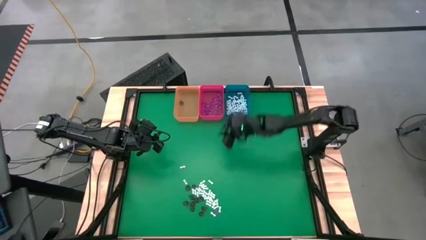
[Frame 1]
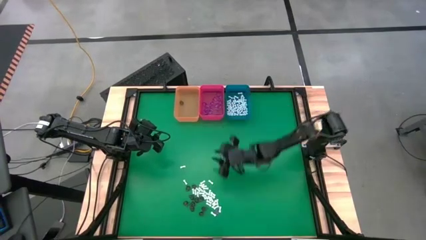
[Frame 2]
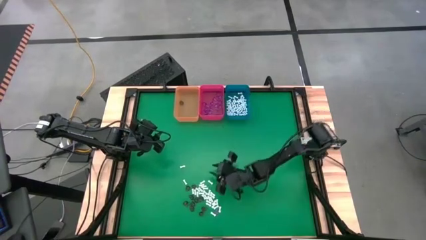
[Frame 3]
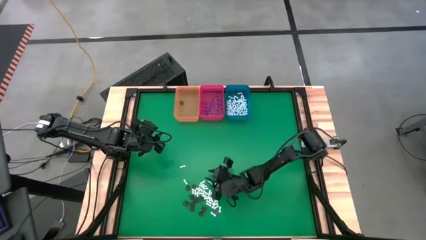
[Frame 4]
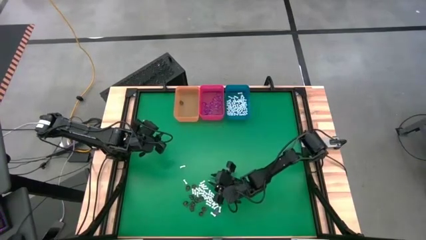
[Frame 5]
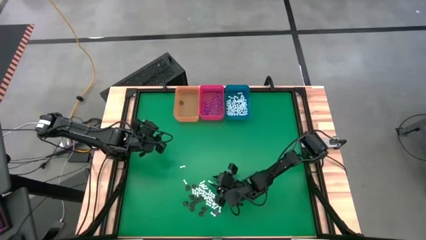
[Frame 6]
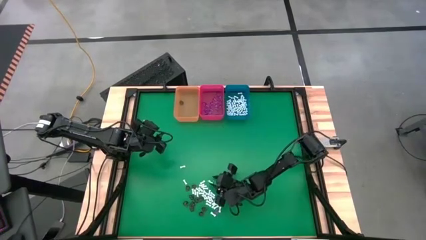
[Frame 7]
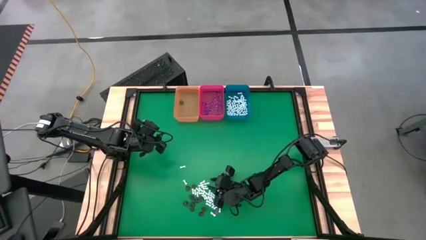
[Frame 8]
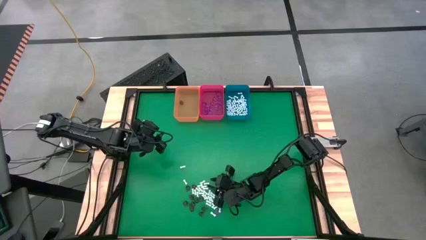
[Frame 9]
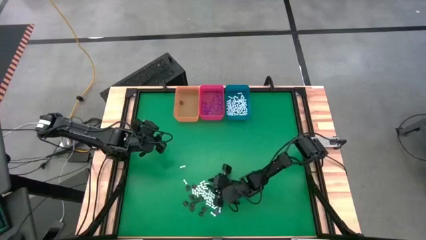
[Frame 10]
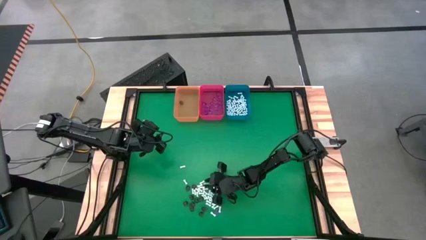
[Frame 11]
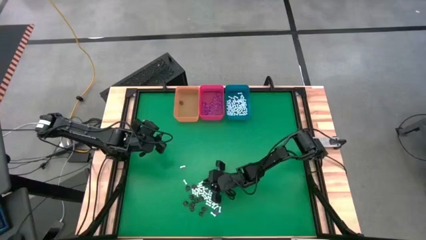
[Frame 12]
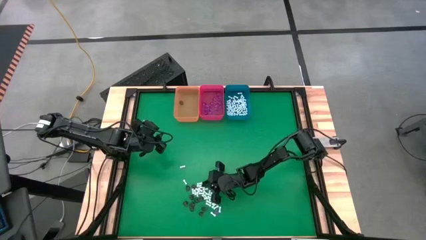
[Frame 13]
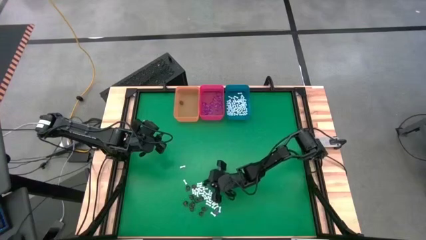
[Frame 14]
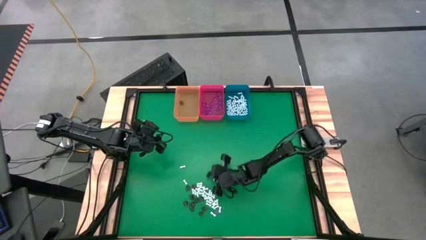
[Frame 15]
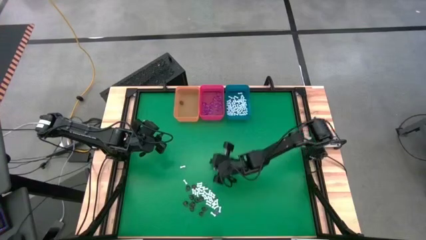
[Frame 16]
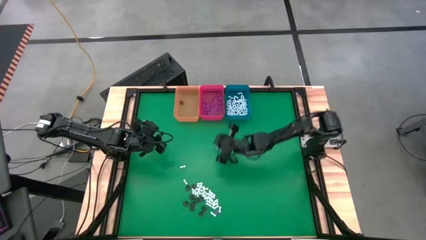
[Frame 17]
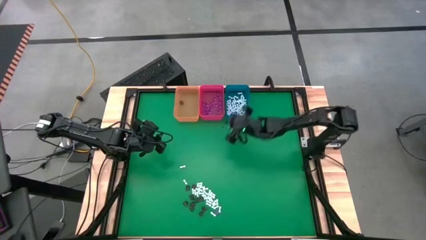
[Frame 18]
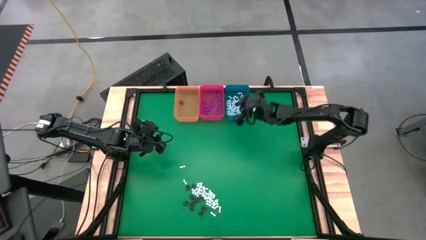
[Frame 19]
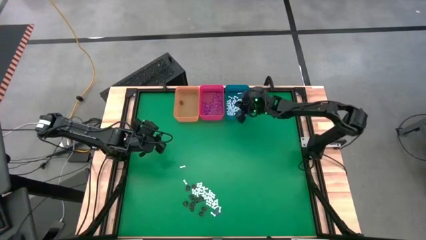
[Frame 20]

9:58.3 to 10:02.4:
Task: Sort Halloween decoration
Put the white bone toy into the blue bin

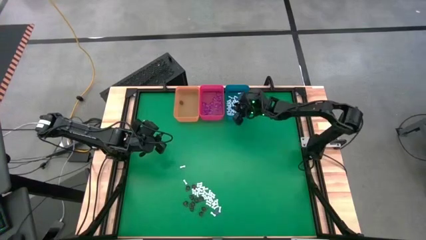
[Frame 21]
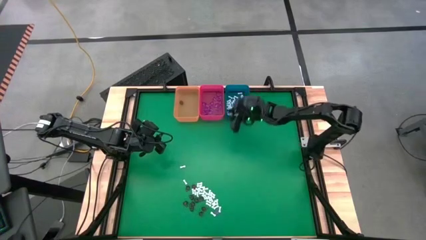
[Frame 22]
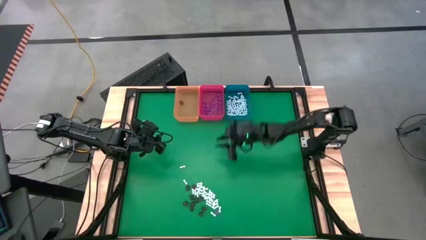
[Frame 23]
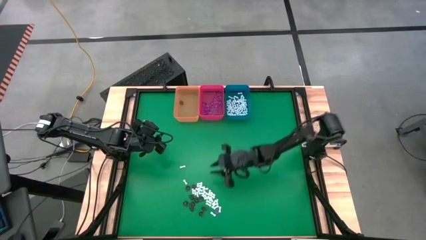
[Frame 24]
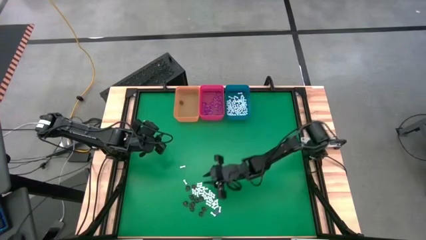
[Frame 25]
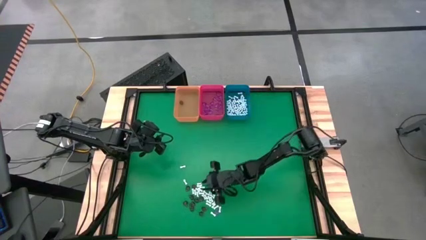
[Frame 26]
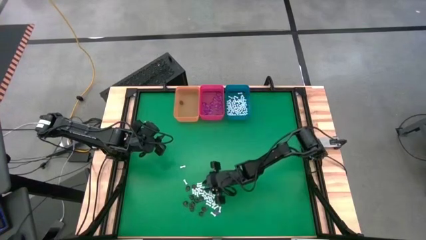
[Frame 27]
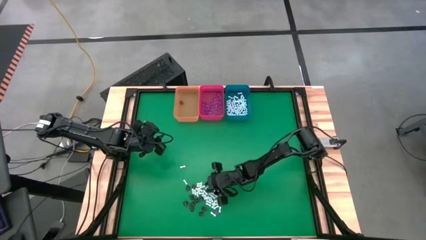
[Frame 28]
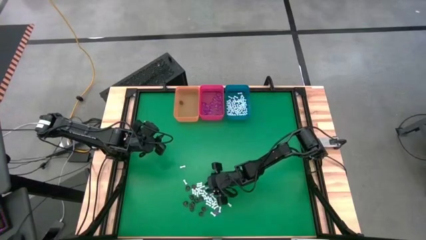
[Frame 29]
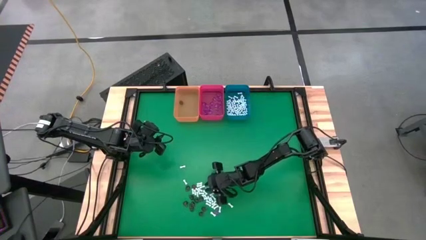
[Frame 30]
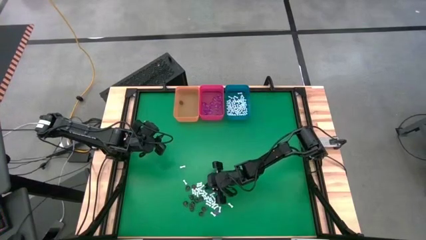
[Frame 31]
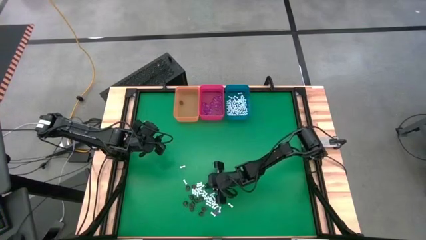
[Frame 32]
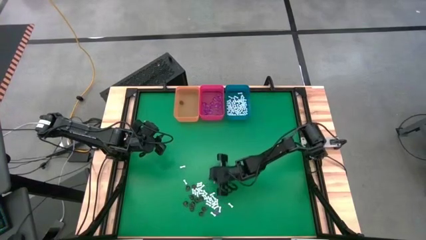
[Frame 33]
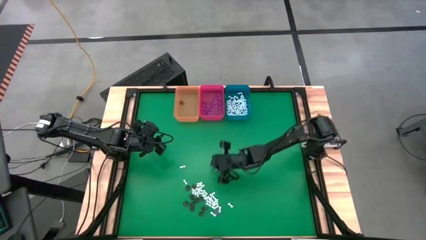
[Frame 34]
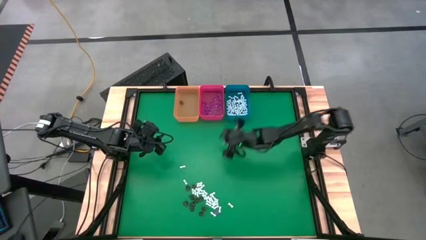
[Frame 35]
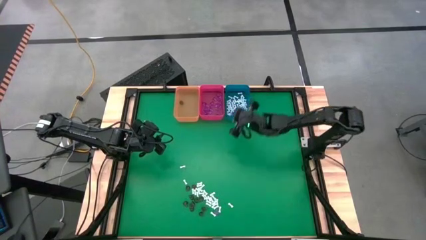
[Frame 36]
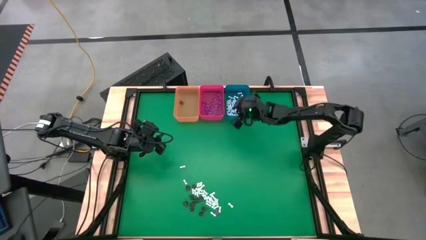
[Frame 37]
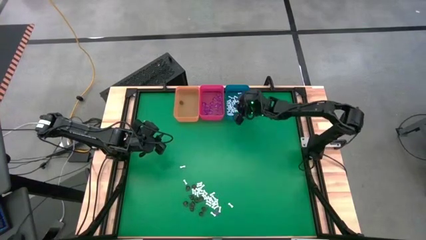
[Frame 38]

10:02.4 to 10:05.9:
Put the white bone toy into the blue bin

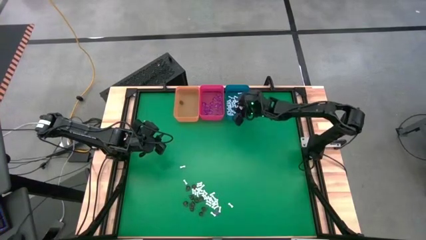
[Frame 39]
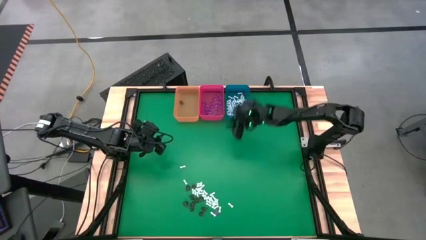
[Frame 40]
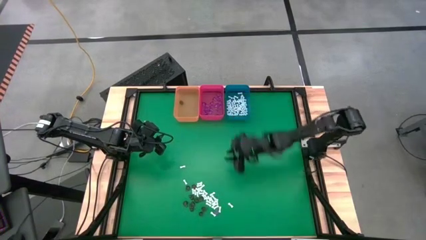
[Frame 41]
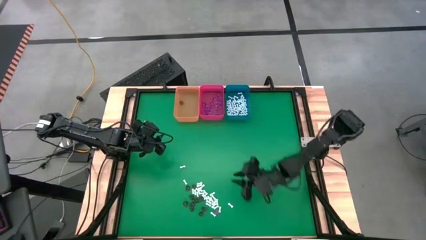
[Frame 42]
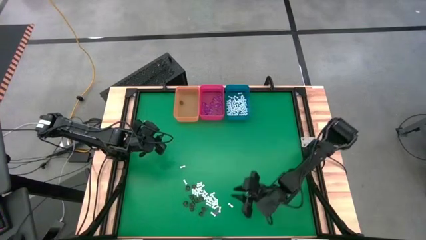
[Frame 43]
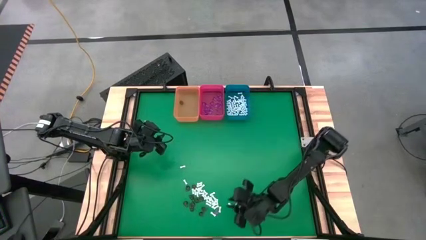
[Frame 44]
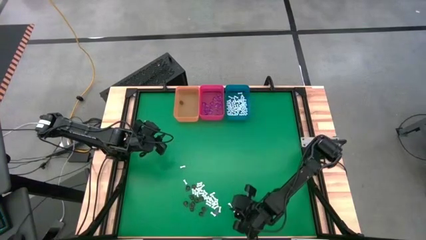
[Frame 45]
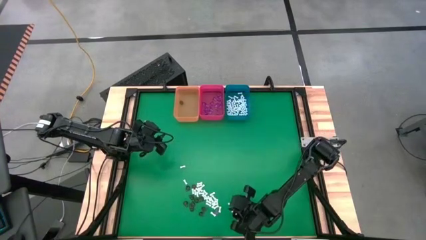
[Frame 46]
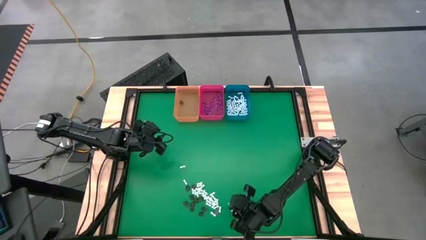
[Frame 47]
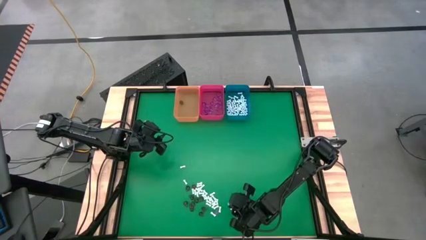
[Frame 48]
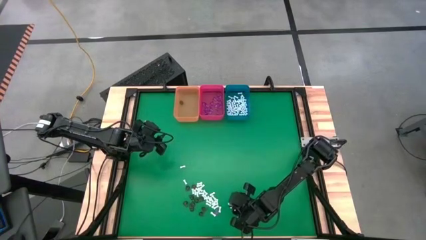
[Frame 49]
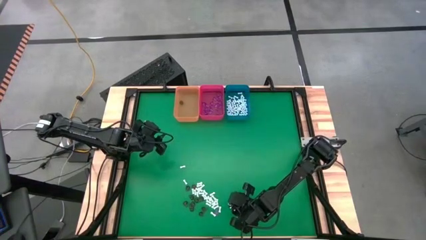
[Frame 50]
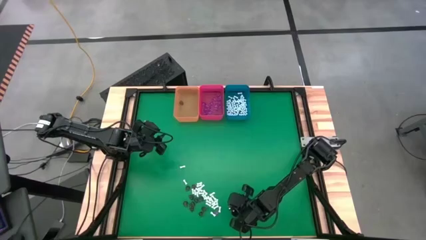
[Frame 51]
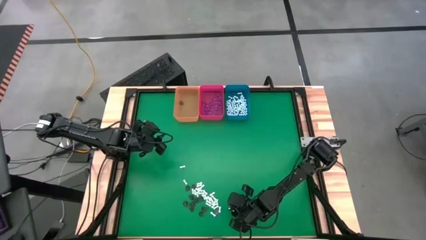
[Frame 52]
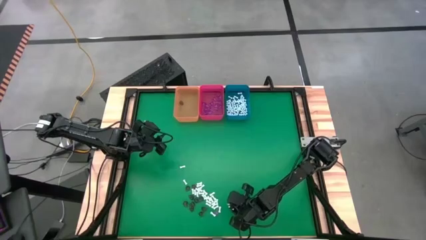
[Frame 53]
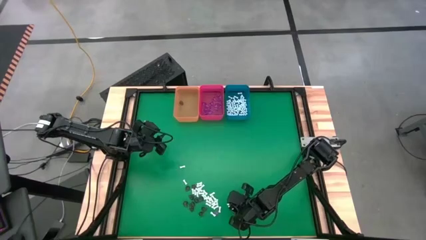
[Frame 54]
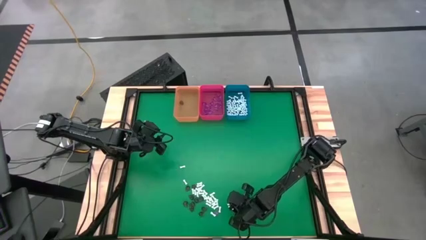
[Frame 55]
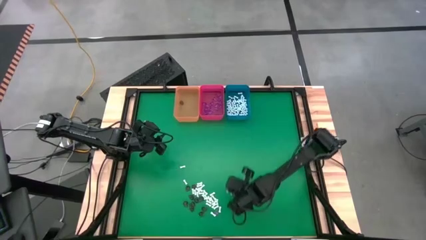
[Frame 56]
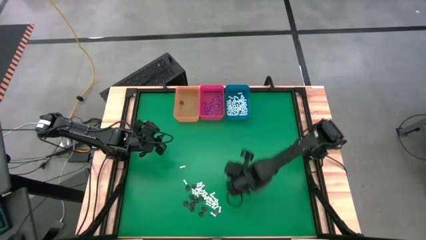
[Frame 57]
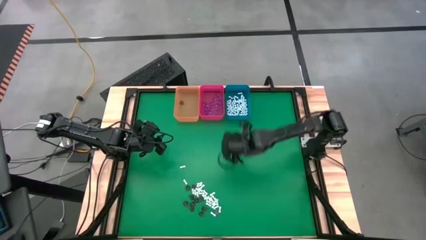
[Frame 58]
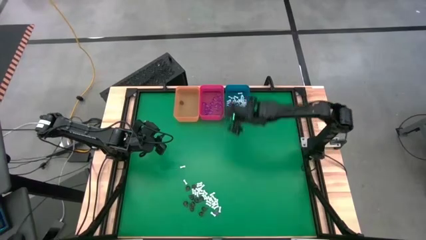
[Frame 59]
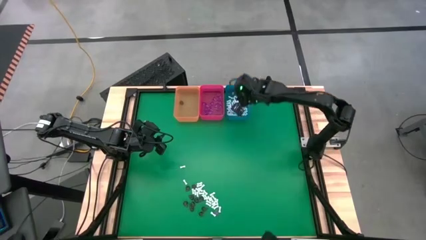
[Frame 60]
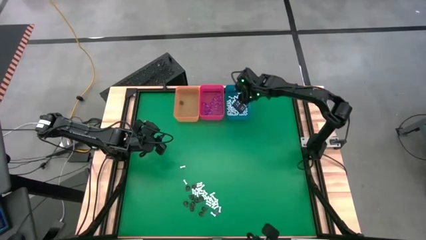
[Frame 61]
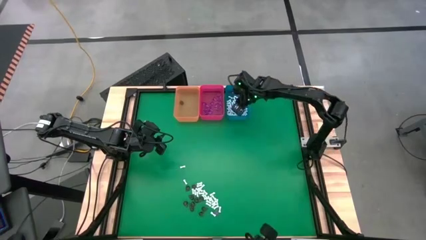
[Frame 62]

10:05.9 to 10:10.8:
Put the white bone toy into the blue bin

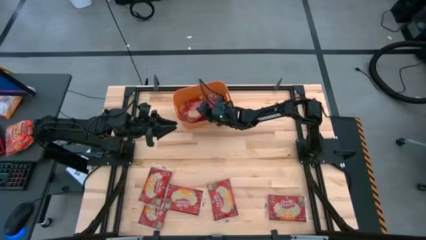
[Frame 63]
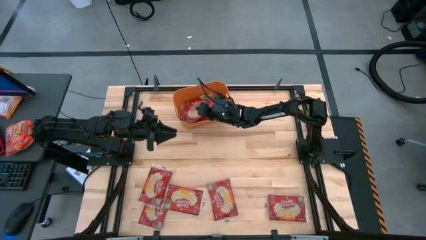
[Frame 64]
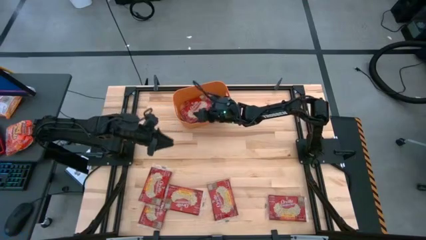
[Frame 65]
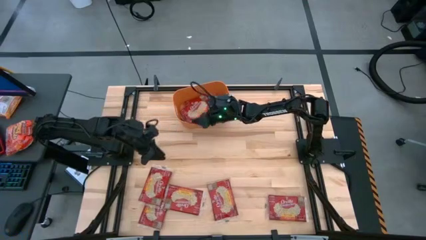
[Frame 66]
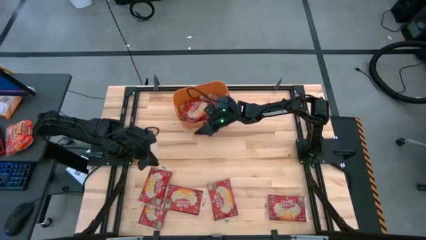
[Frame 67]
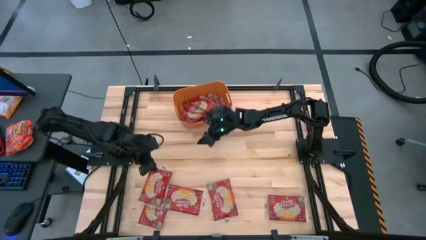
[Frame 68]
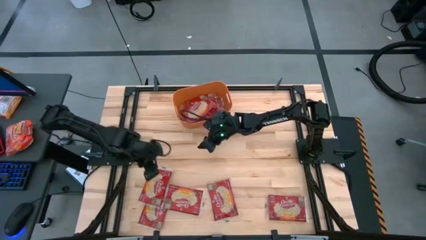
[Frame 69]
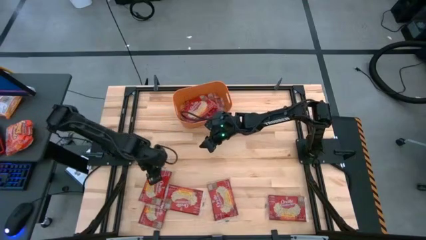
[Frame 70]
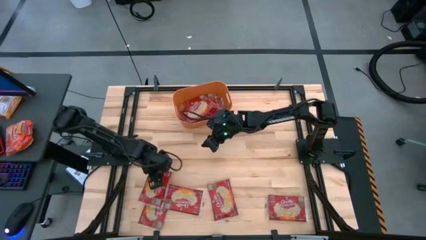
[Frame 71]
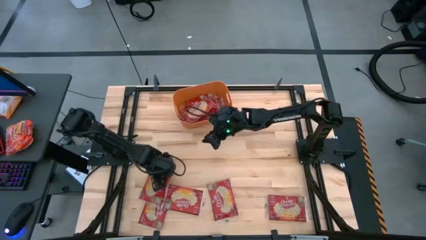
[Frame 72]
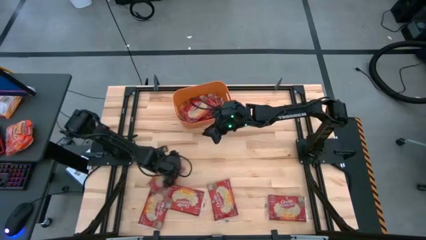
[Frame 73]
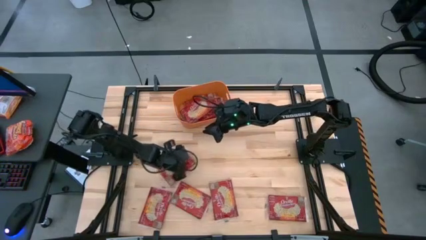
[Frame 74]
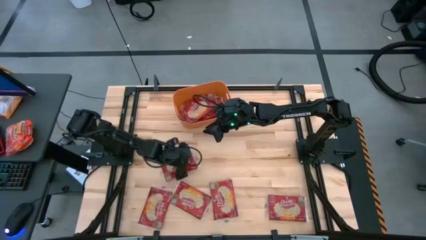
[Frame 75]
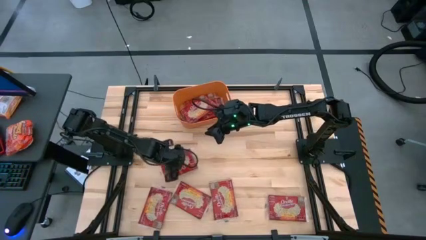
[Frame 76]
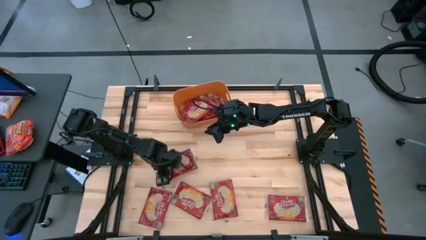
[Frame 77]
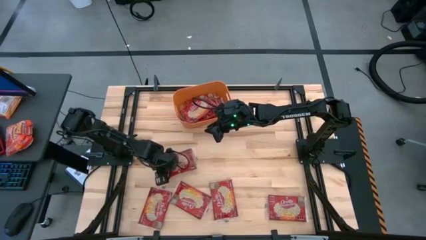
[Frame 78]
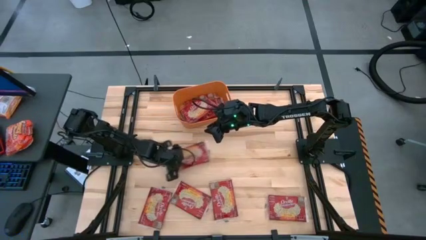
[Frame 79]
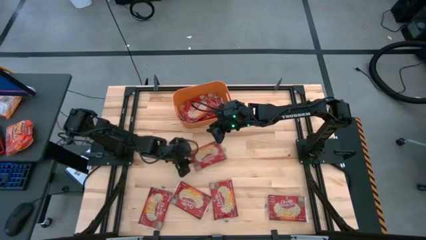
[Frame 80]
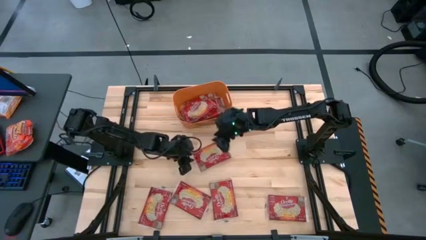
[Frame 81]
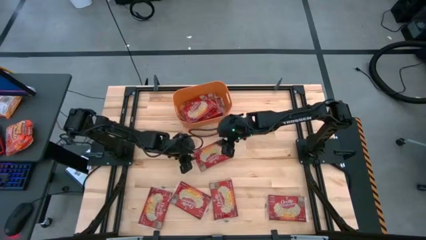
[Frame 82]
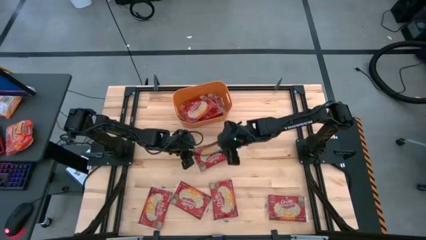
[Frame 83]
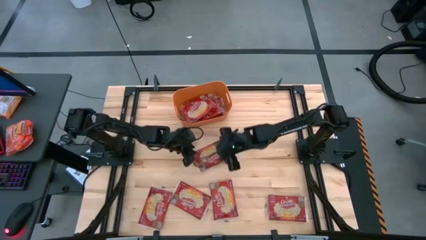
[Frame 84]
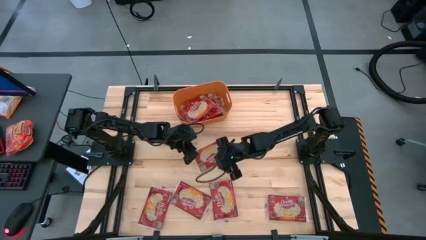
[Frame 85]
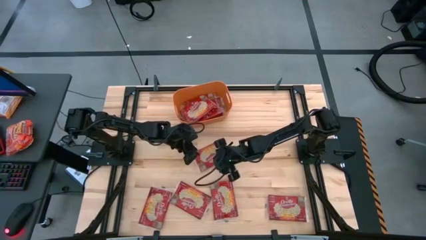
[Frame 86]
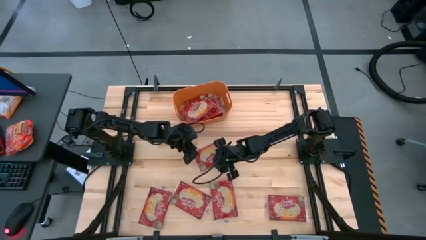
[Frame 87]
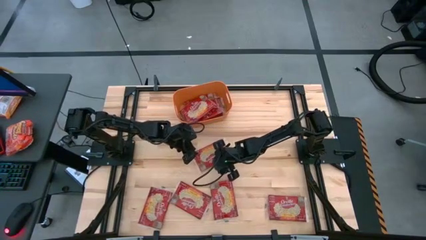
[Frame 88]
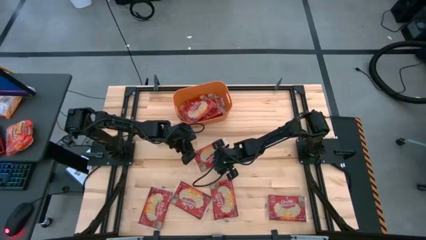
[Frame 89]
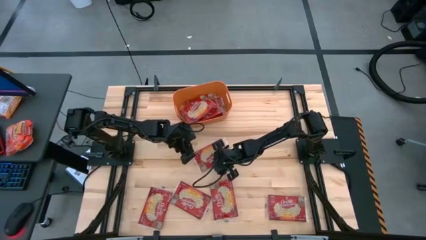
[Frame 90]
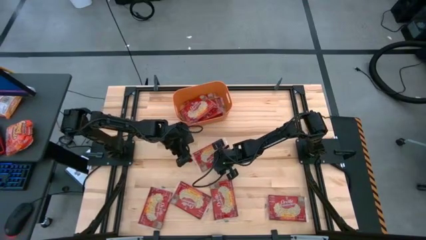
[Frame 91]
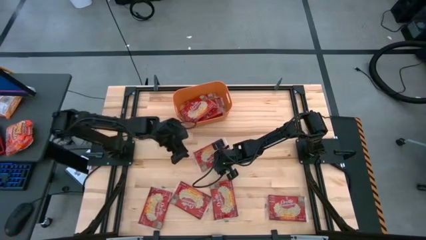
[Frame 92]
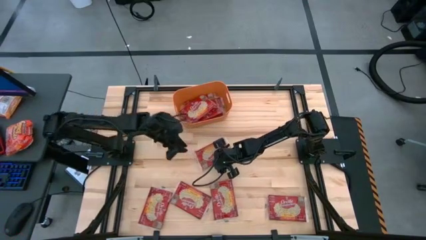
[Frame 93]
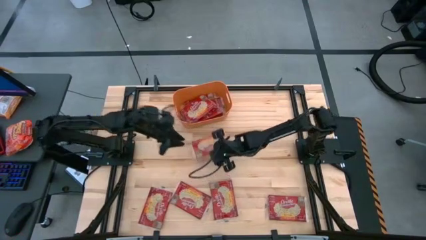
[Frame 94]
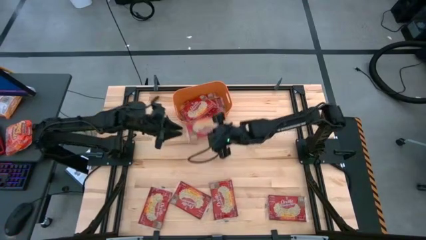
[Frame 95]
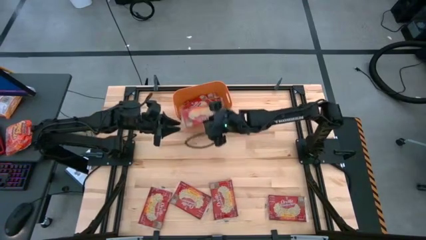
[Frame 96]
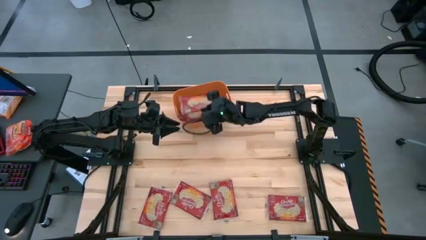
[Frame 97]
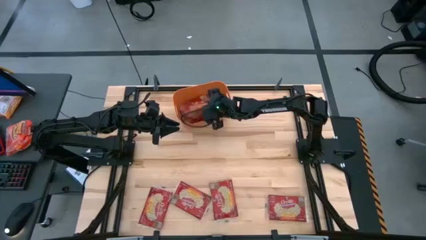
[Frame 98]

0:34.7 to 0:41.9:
Task: Sort popcorn bags into baskets
Put the red popcorn bag into the orange bin
